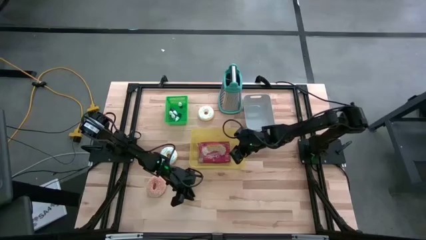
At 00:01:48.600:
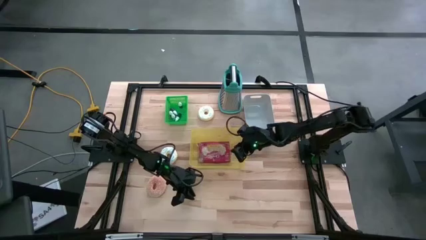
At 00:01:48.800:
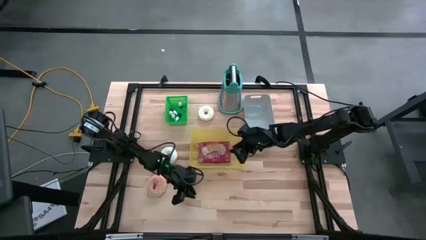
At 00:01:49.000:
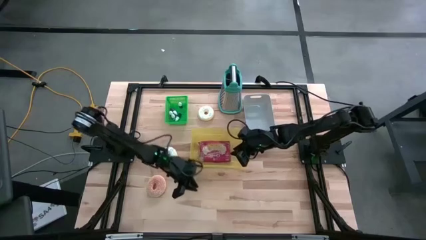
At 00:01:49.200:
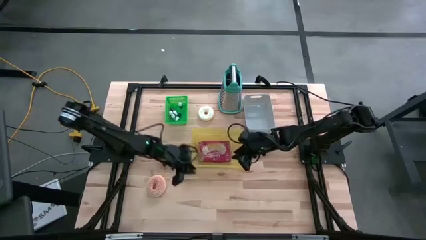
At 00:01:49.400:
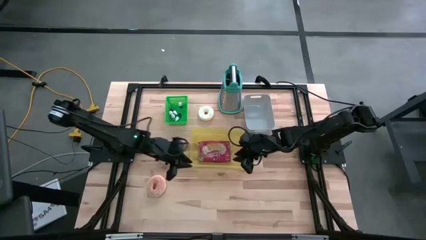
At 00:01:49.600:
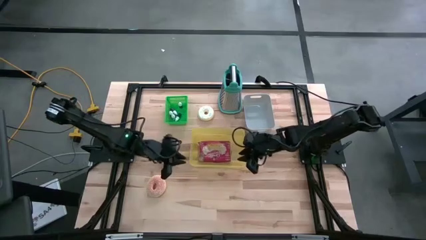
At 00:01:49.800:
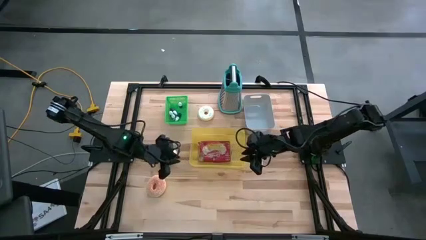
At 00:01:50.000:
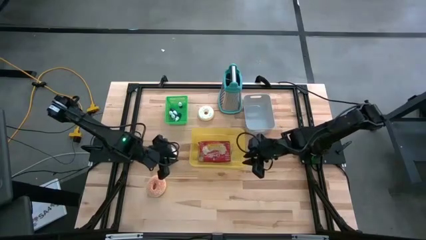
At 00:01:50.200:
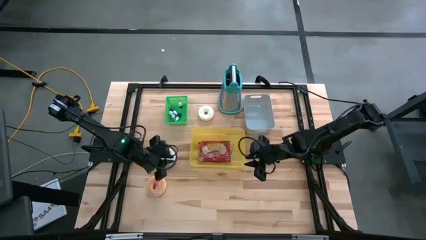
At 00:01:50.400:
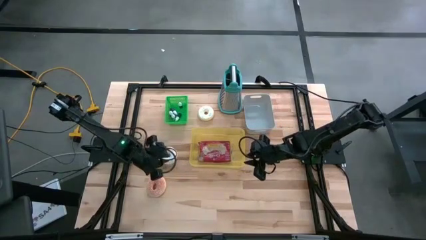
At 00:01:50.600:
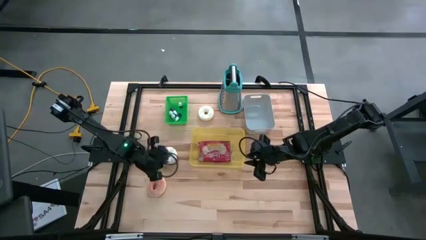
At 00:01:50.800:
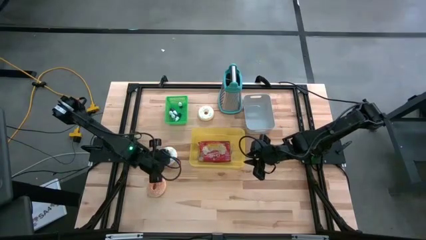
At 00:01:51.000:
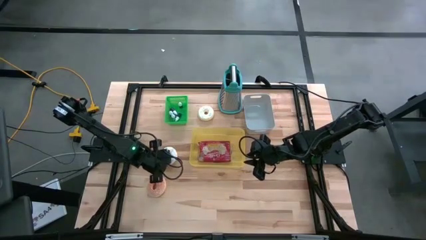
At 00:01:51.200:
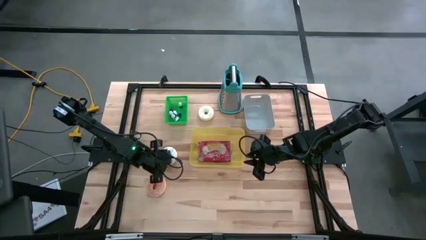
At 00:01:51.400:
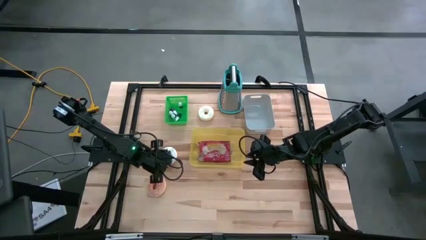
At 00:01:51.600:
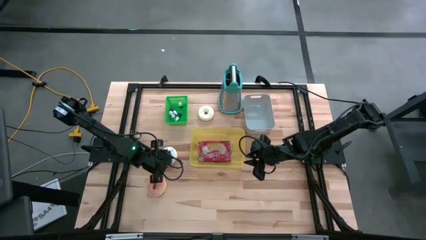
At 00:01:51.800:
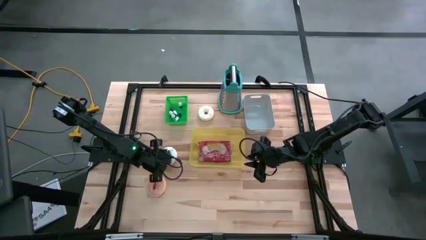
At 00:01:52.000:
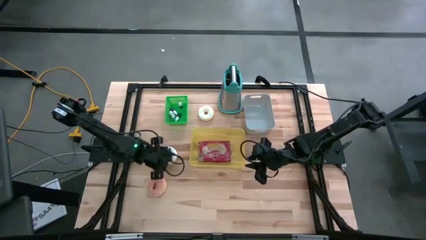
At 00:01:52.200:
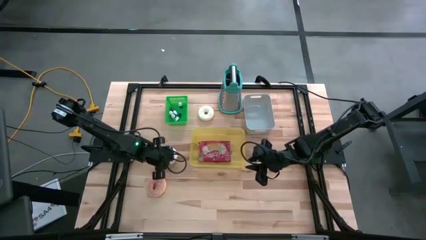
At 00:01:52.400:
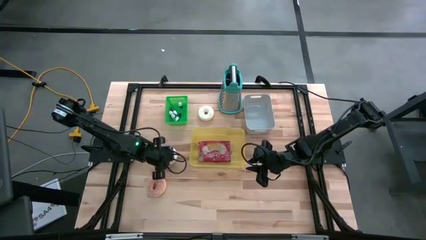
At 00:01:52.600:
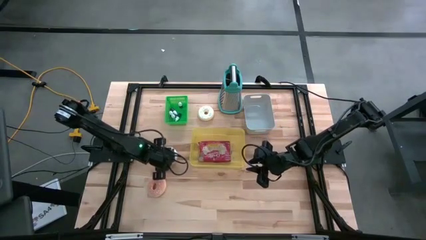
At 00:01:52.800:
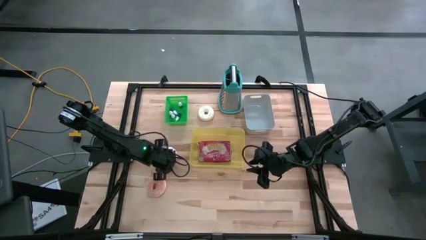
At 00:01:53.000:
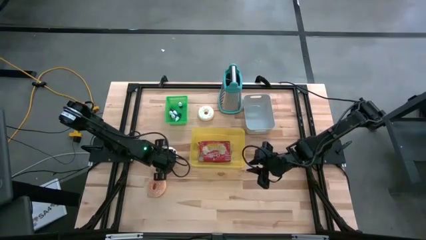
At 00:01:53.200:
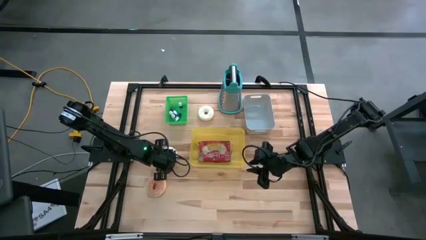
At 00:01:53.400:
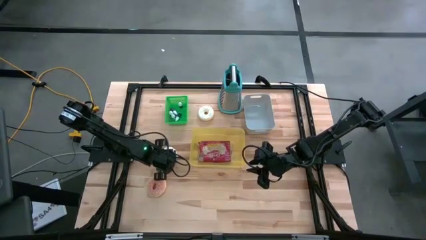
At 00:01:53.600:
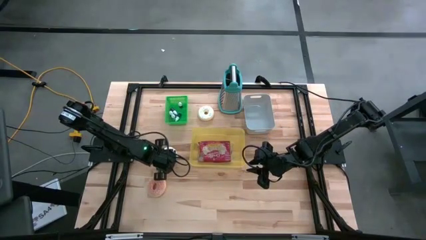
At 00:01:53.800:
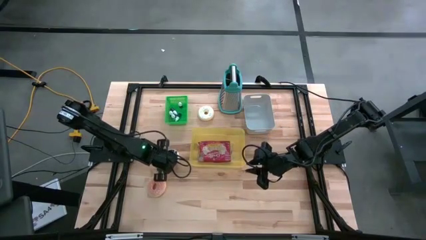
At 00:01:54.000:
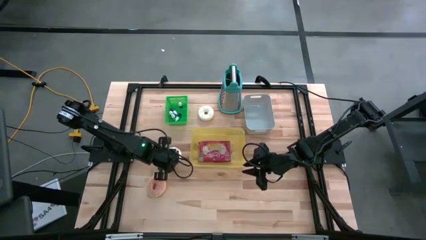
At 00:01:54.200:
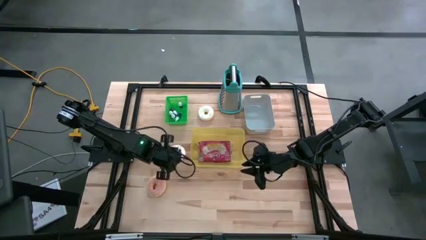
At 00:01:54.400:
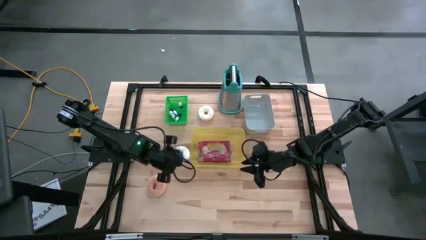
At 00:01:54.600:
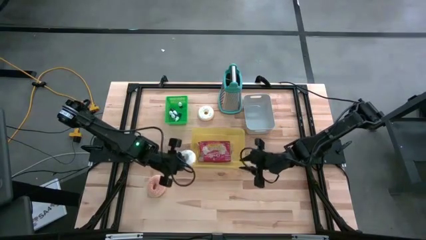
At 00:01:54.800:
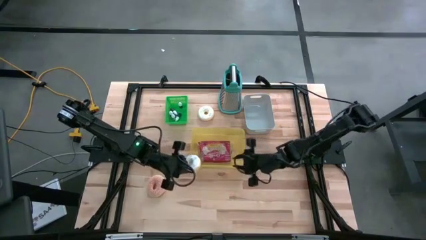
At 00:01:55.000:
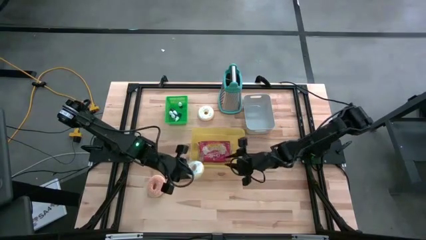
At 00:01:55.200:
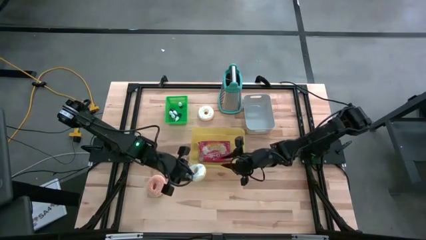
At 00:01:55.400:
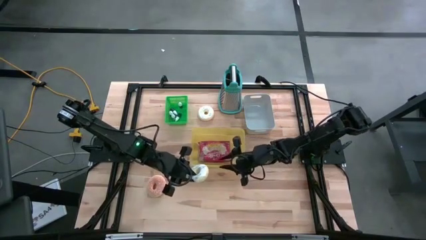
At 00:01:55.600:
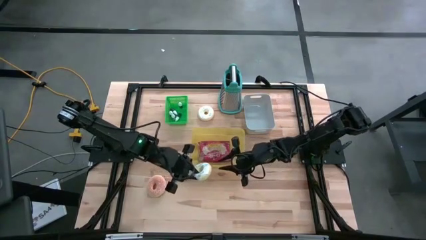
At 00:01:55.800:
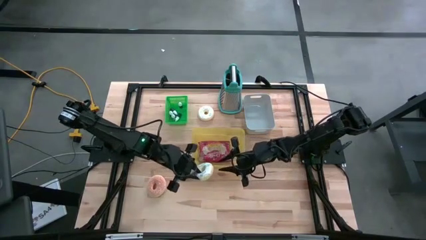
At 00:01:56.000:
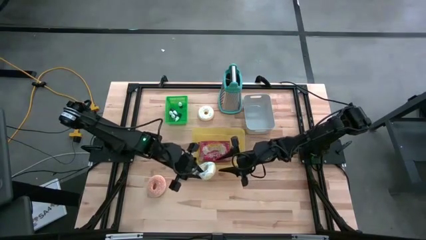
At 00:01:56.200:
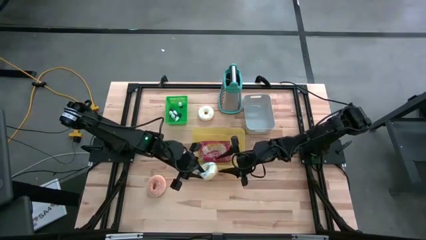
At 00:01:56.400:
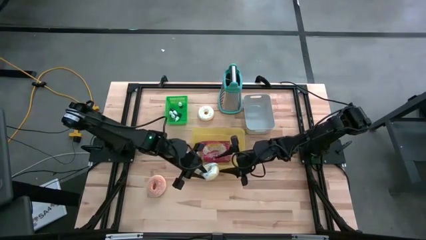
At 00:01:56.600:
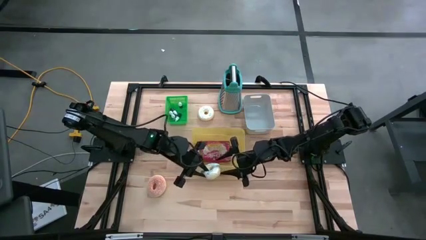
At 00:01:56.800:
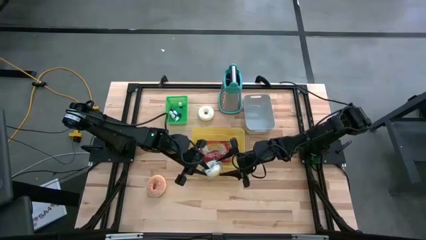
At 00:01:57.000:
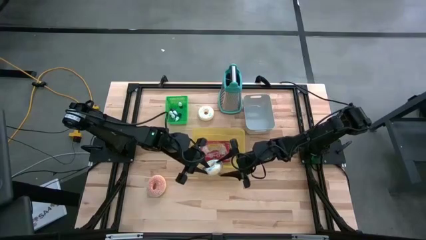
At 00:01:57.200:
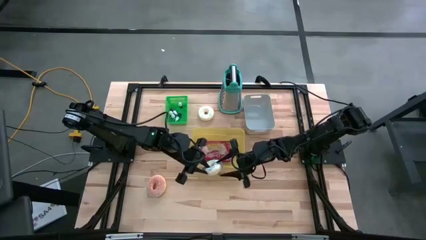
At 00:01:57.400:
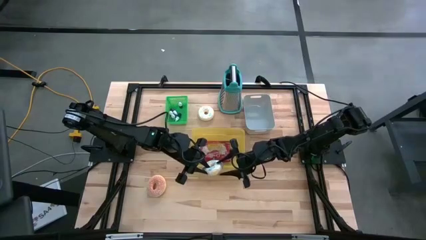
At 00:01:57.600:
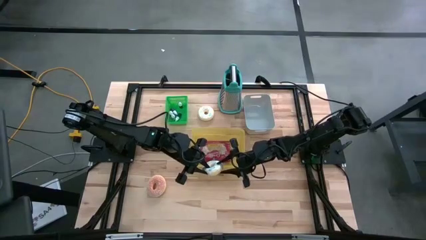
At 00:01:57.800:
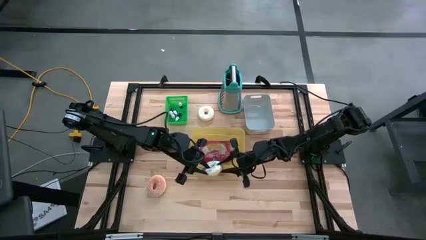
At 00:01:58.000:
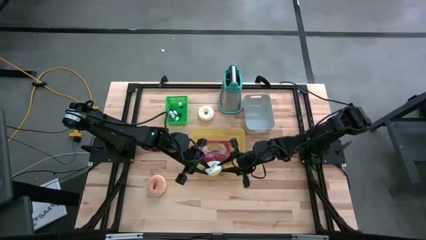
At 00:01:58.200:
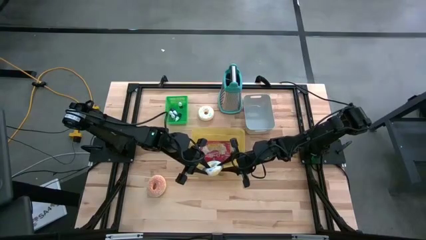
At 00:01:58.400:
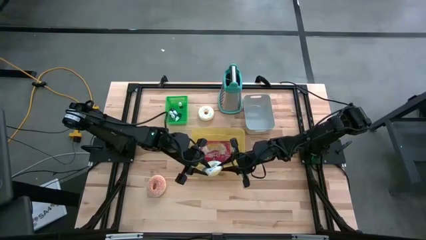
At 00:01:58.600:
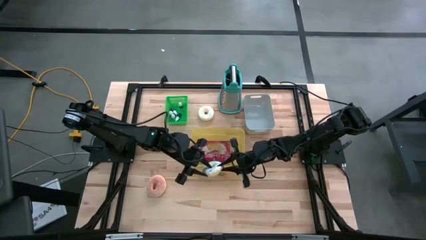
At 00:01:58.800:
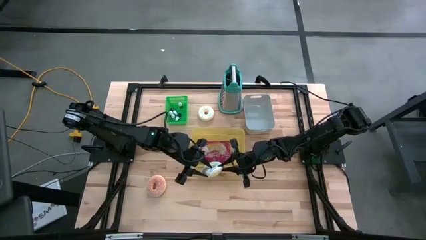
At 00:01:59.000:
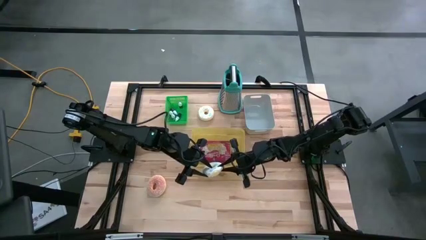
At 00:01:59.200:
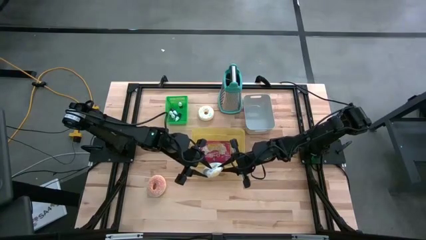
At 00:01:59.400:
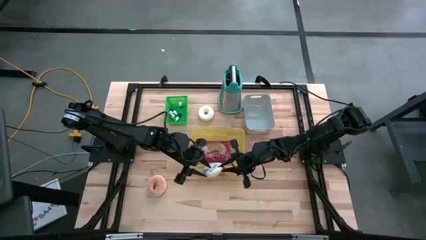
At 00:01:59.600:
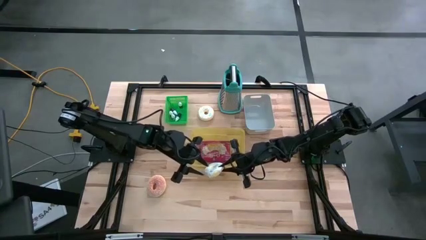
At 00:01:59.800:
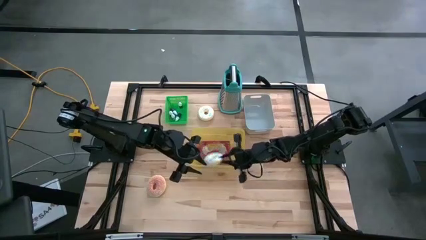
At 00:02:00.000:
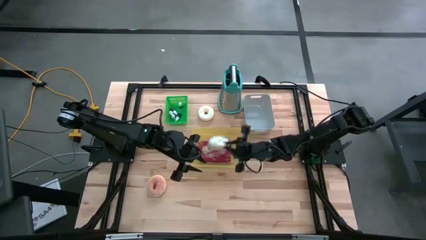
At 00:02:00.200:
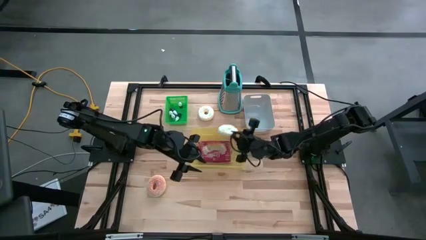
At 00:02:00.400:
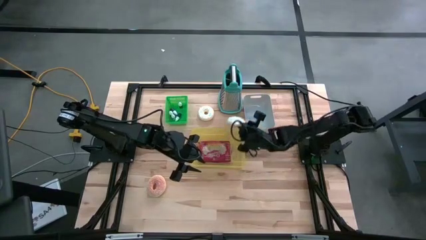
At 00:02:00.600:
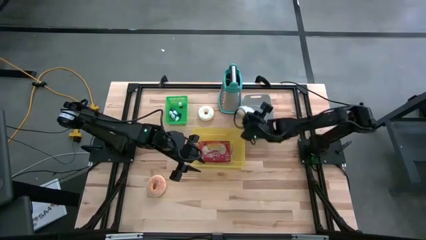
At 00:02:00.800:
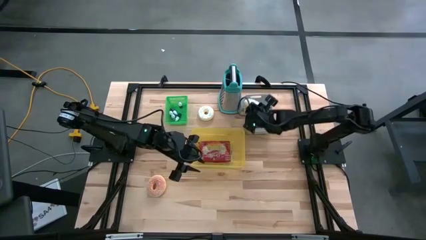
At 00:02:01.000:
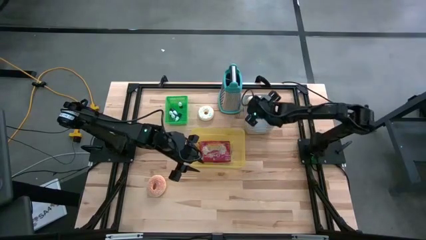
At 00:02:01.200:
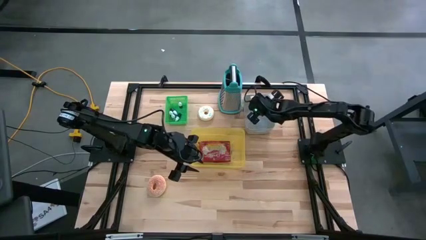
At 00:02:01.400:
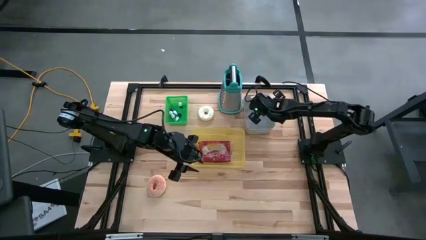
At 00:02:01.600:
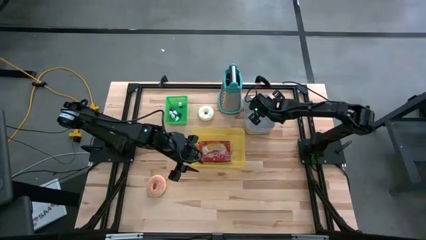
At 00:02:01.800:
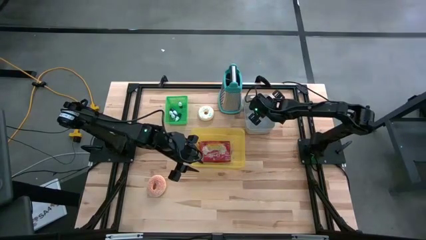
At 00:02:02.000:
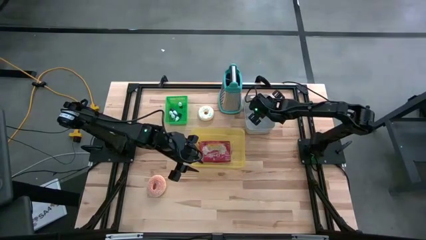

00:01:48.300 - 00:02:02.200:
Put the bottom white donut into the gray bin
